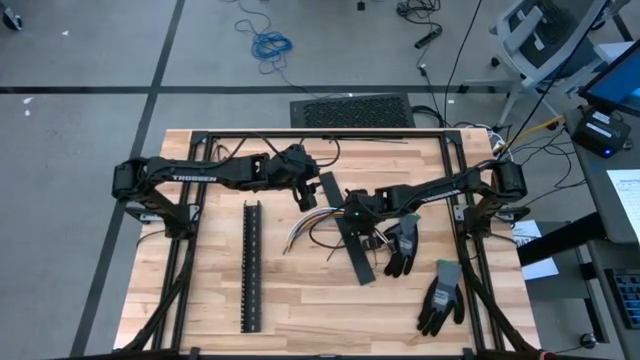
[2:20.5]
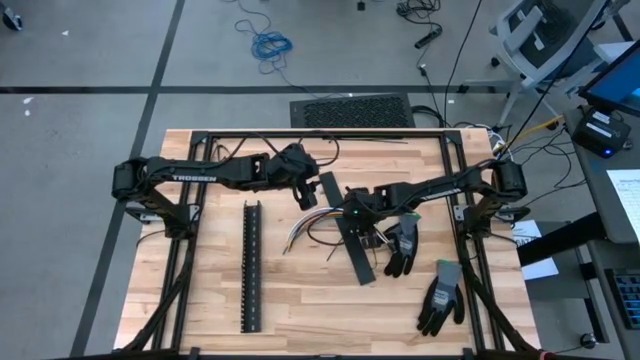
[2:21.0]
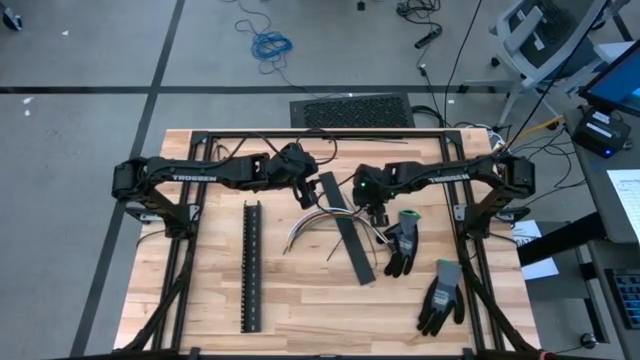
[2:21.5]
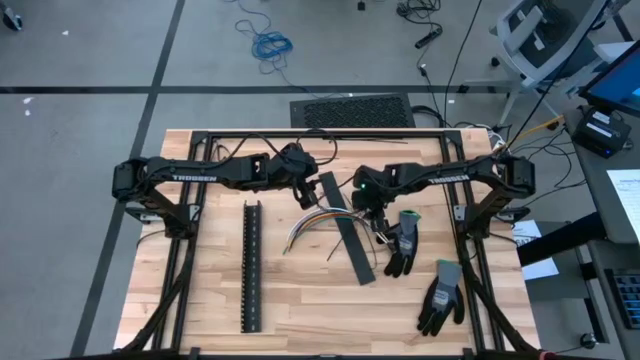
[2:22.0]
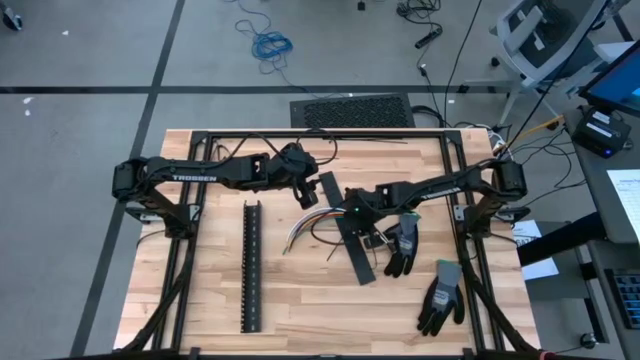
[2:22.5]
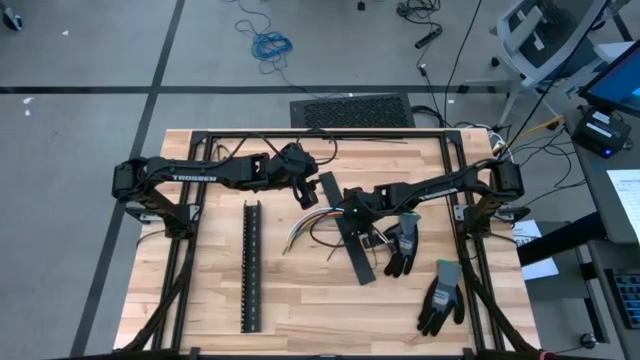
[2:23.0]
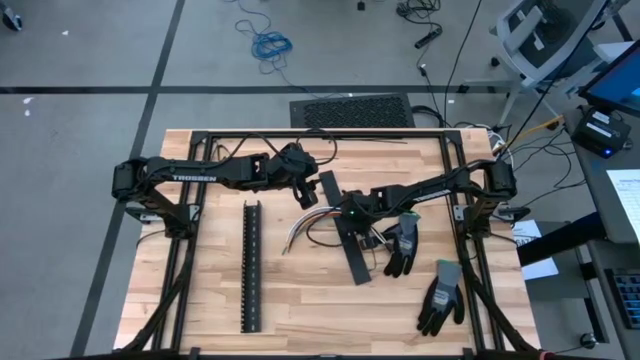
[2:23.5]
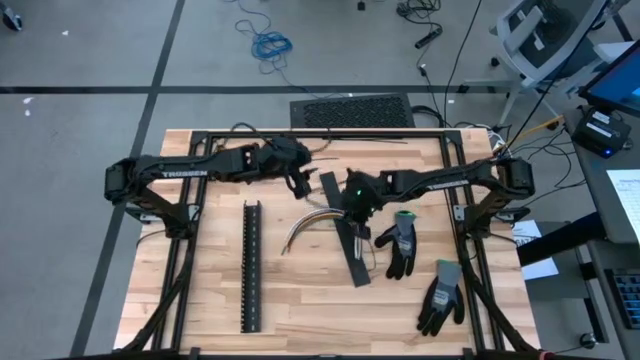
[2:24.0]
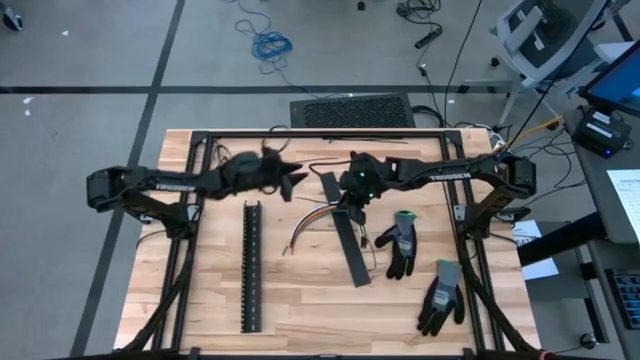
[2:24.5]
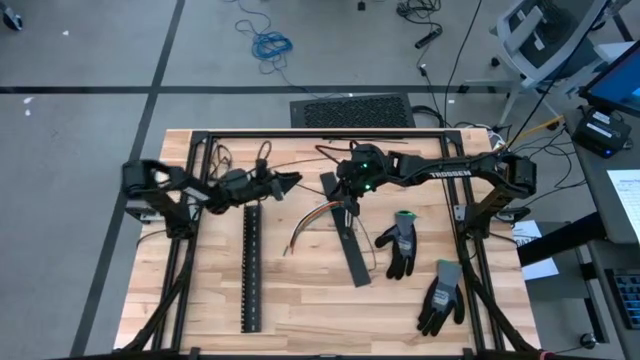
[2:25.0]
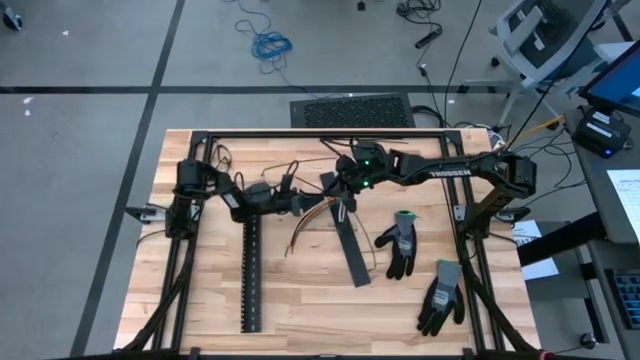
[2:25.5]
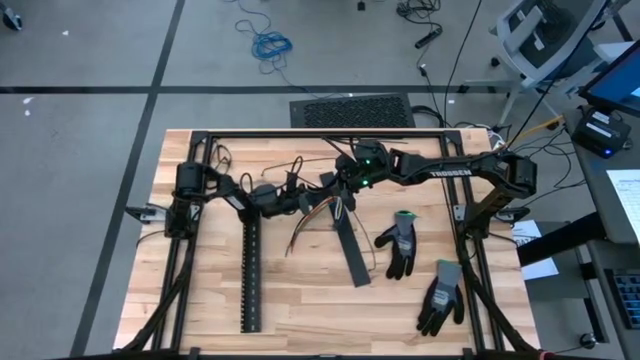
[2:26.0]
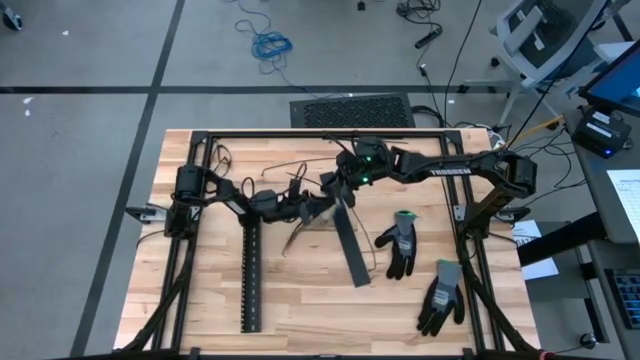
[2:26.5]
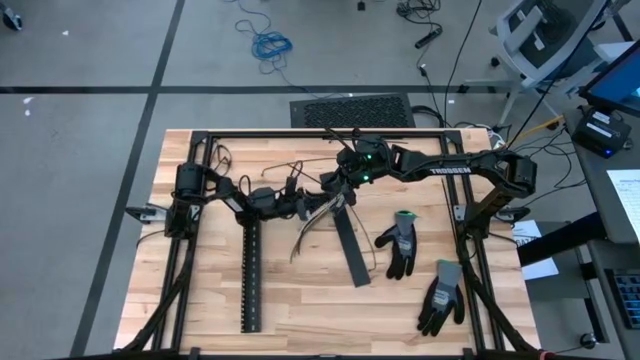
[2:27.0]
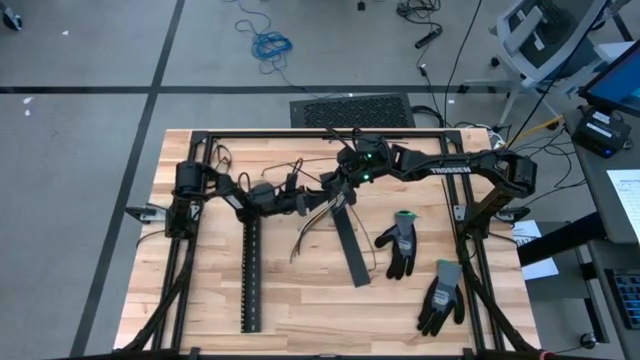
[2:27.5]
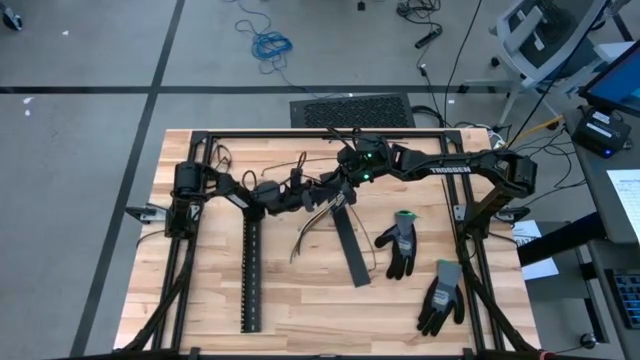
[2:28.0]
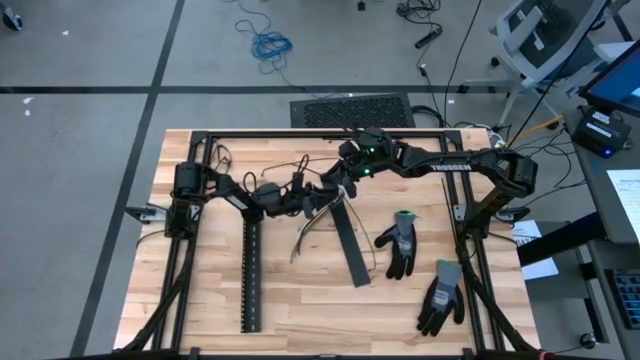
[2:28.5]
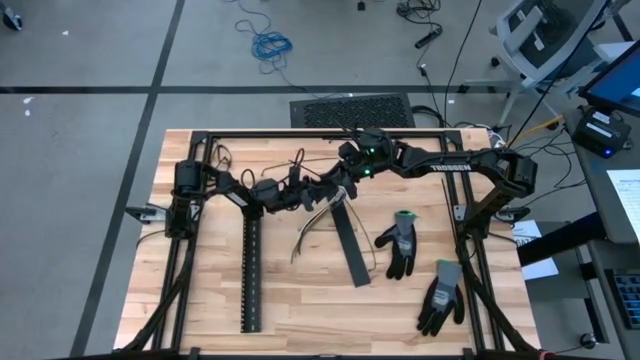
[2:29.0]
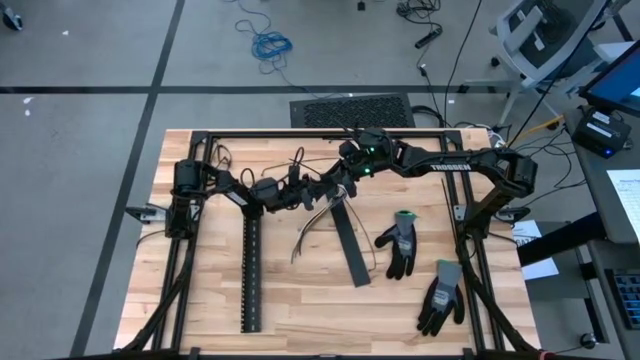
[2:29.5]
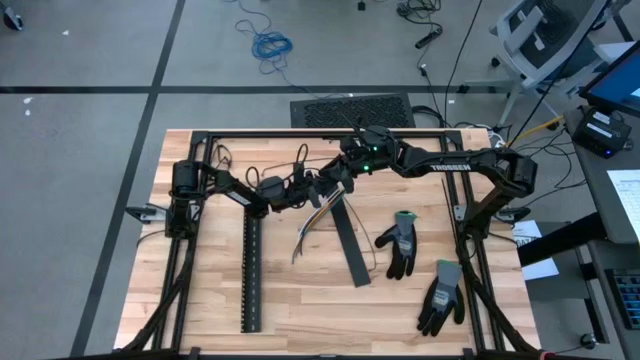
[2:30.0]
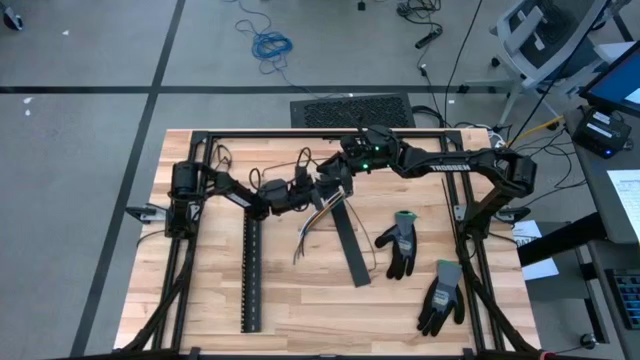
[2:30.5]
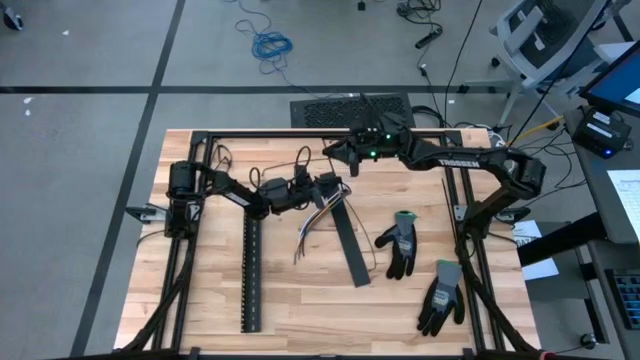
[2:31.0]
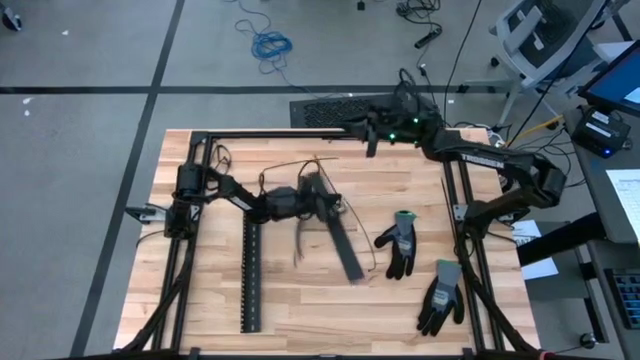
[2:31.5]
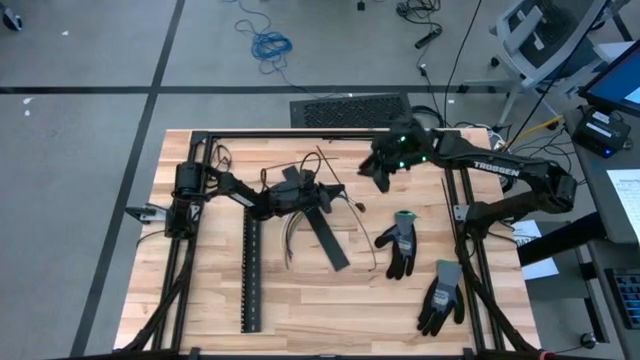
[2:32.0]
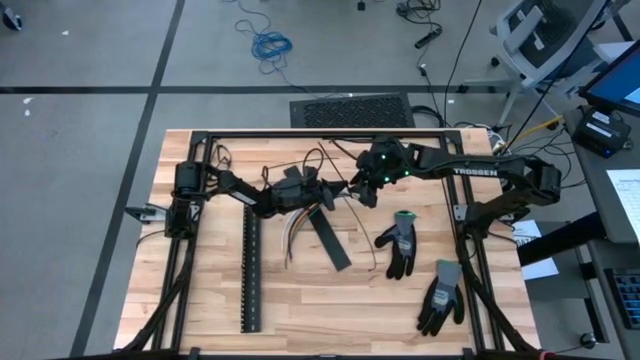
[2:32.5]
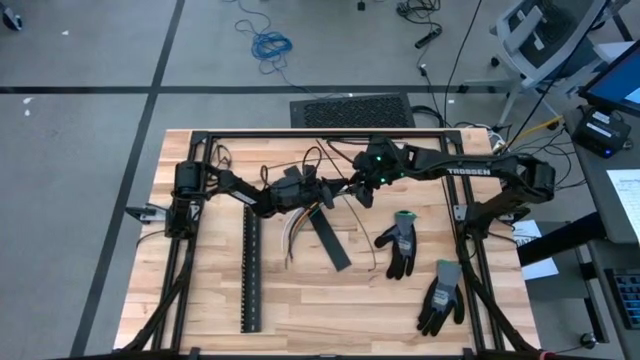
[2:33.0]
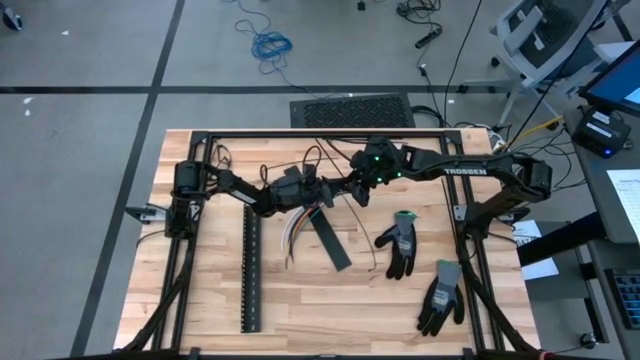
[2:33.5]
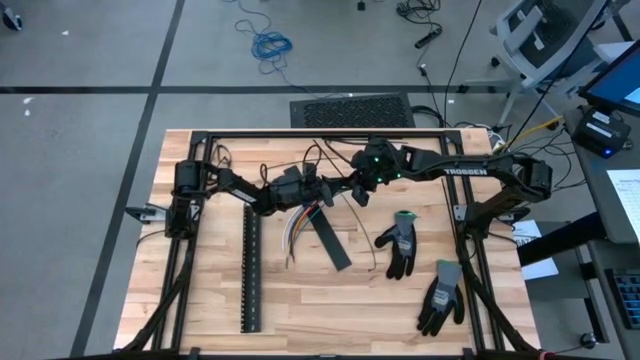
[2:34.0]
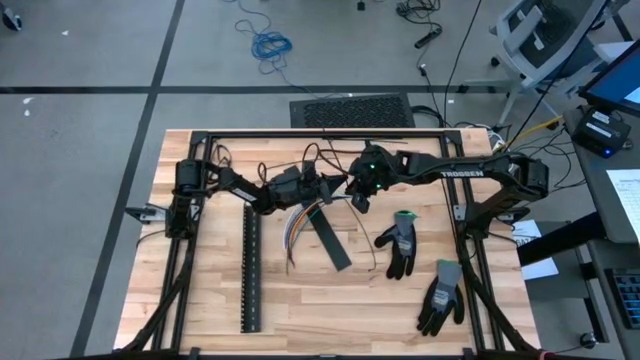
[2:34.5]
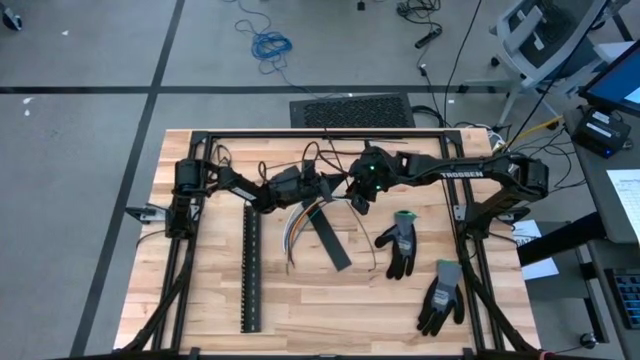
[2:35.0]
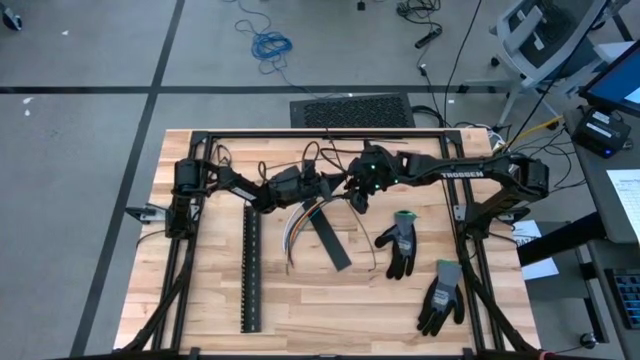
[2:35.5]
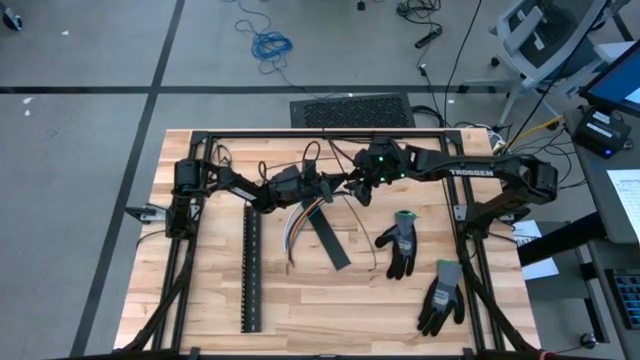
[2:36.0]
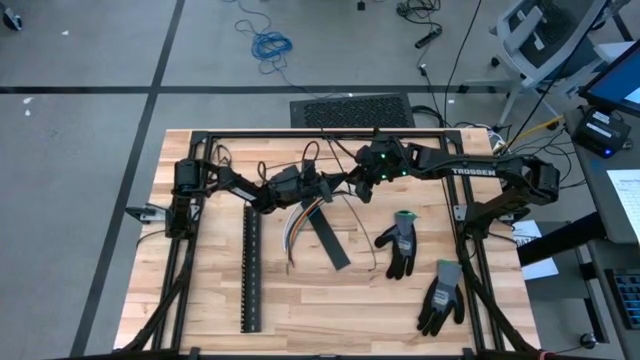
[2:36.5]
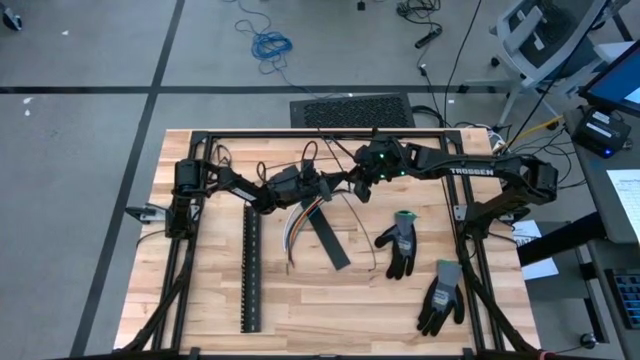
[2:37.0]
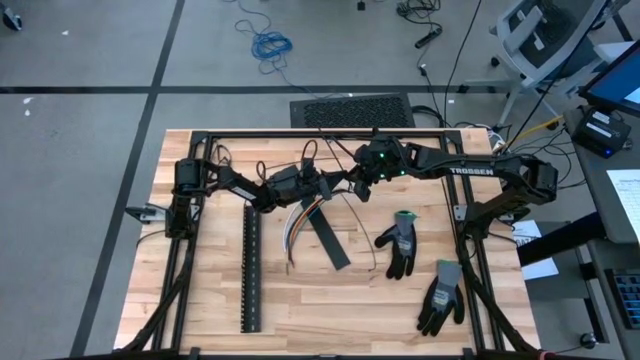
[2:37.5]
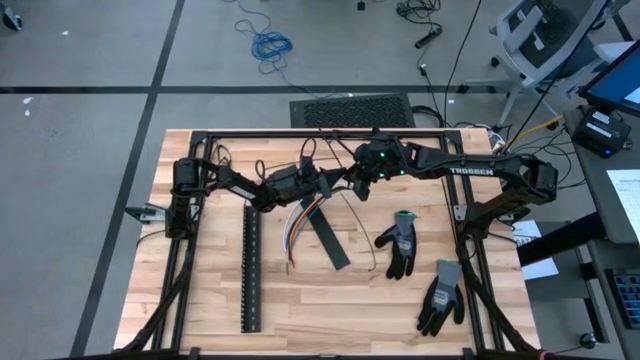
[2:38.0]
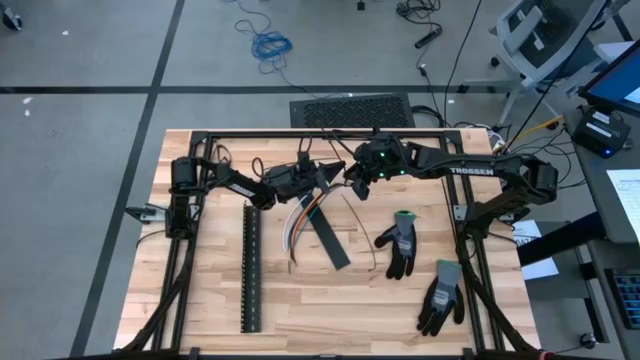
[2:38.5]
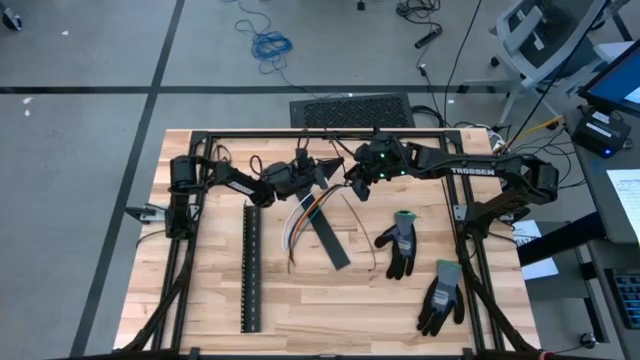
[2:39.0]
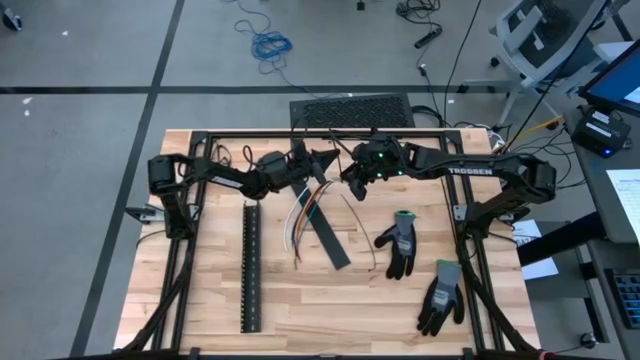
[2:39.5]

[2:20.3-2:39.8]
Task: Ziptie cables
Wrap the black zip tie on the cables

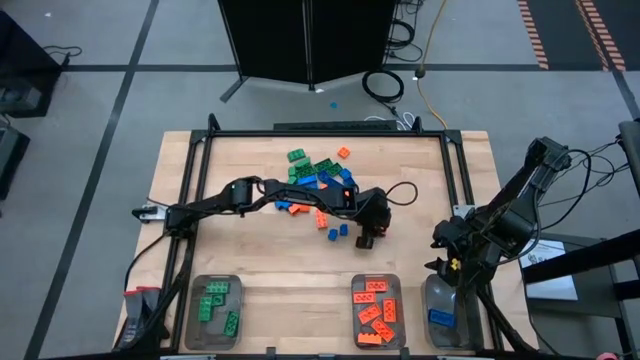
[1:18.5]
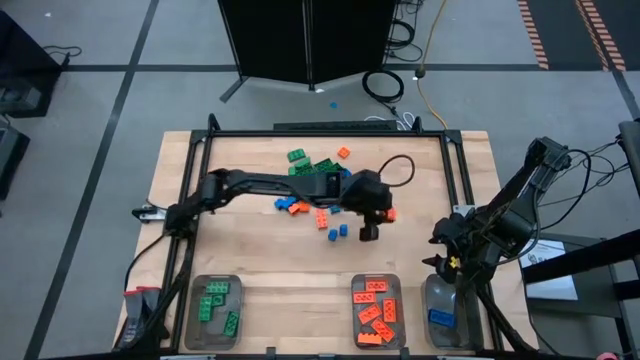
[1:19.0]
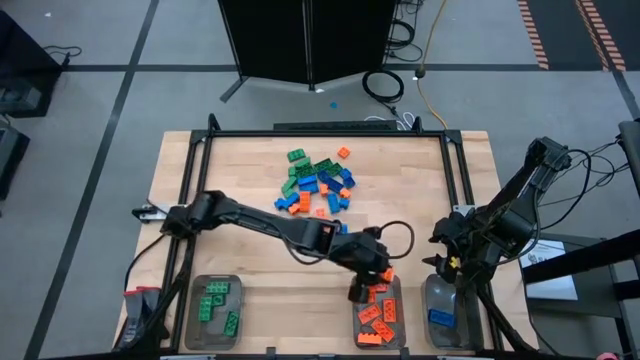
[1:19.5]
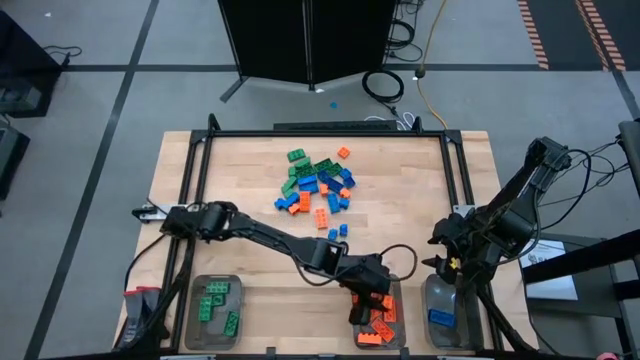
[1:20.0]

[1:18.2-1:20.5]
Task: Sort blocks
Put the orange game piece into the center black bin

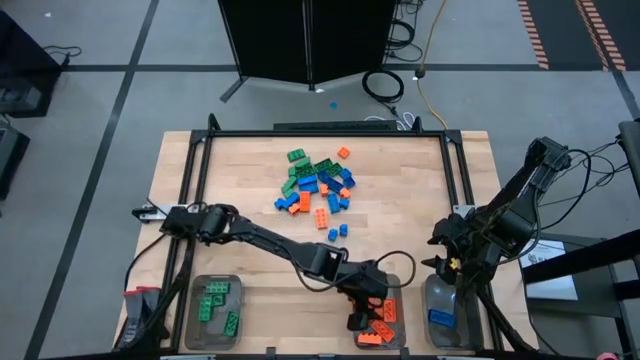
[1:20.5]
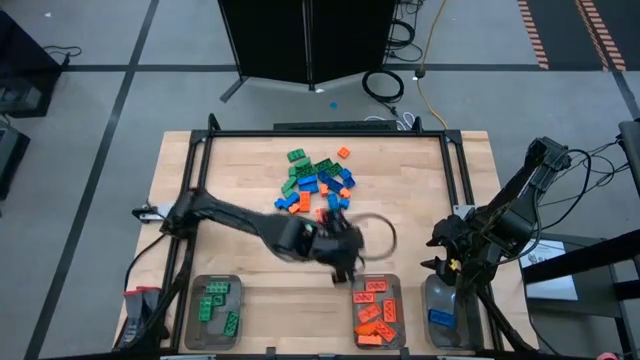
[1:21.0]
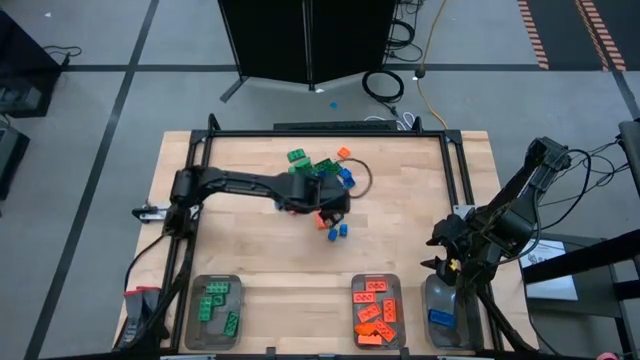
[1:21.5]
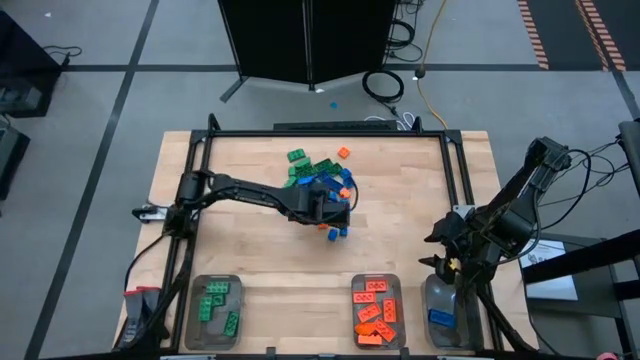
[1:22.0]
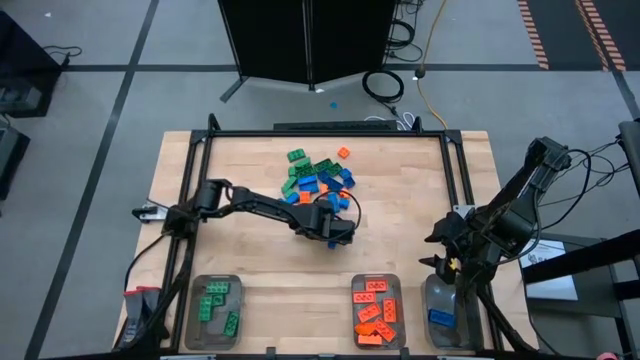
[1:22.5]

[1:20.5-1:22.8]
Put the orange game piece into the center black bin
